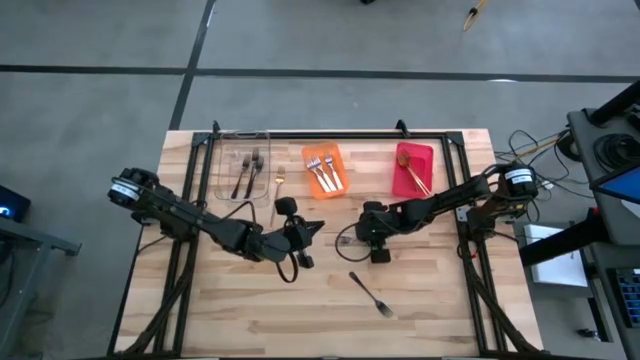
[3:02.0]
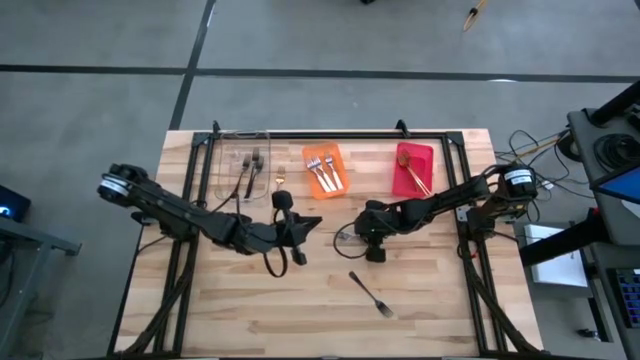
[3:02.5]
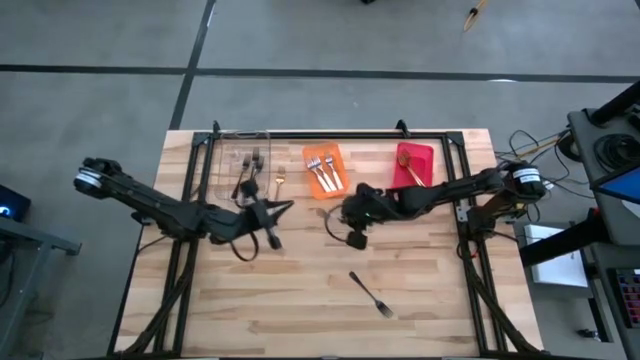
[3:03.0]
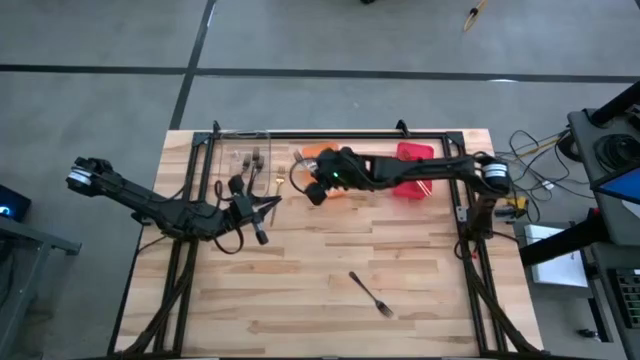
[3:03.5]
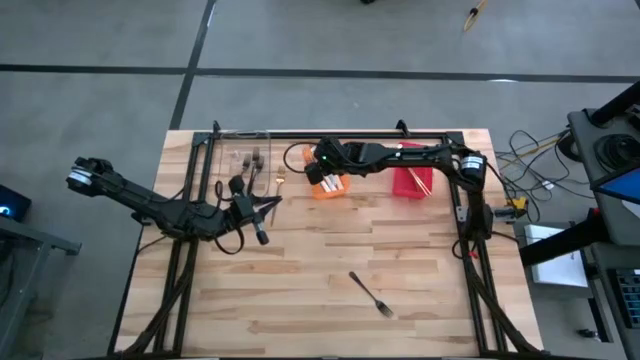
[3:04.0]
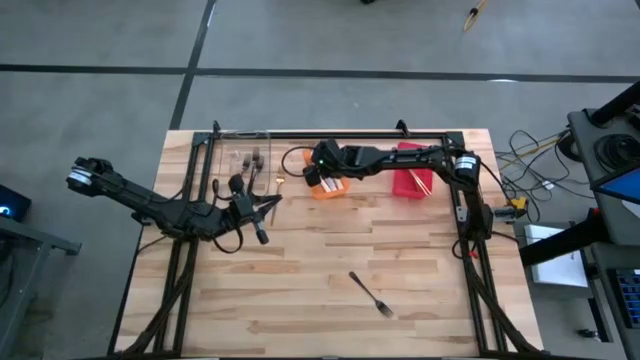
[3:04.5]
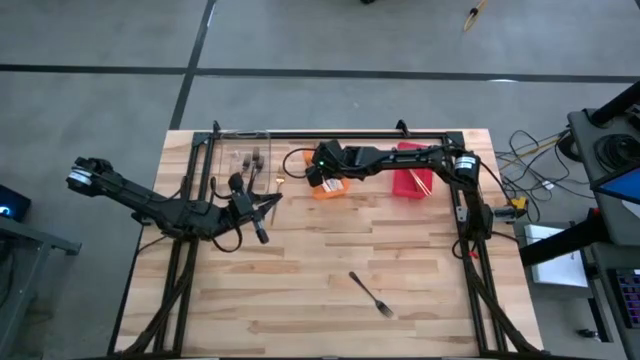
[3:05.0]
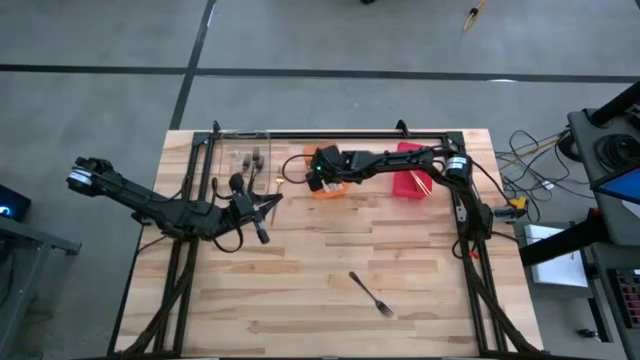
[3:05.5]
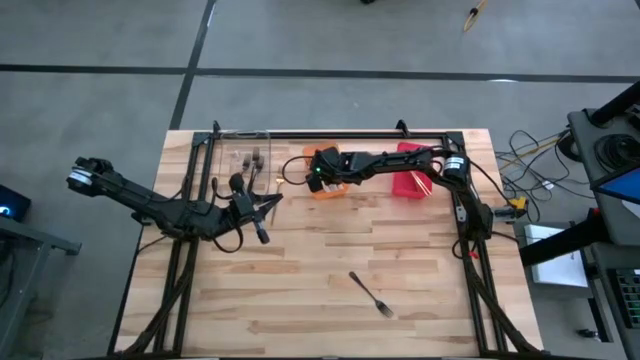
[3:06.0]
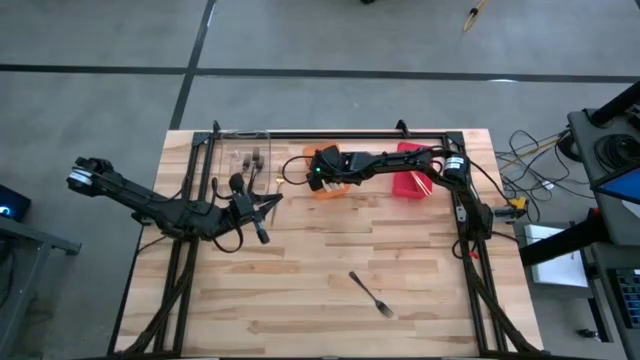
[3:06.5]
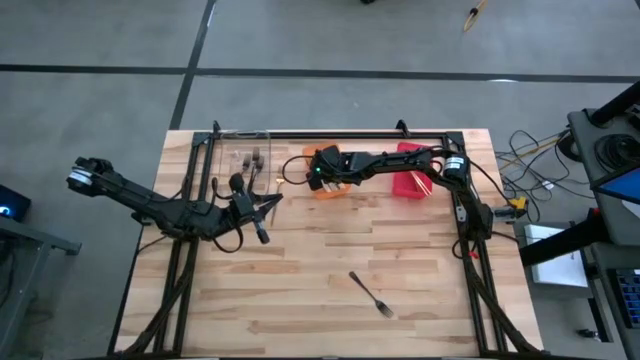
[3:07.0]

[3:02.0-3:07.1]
Task: Sort silverware by color (type)
Put the white fork into the orange bin

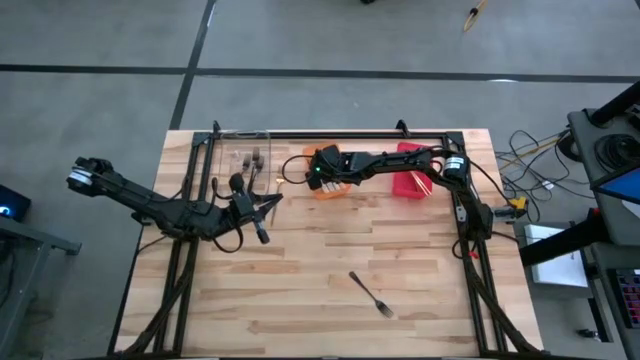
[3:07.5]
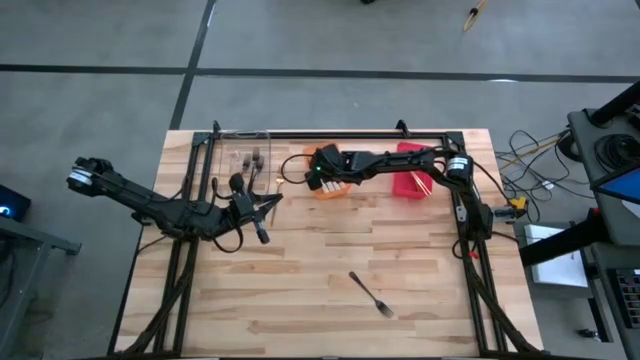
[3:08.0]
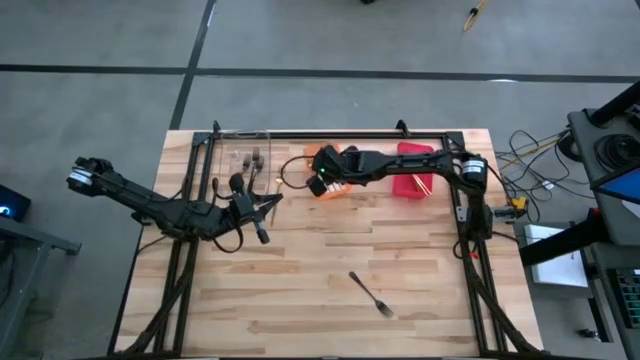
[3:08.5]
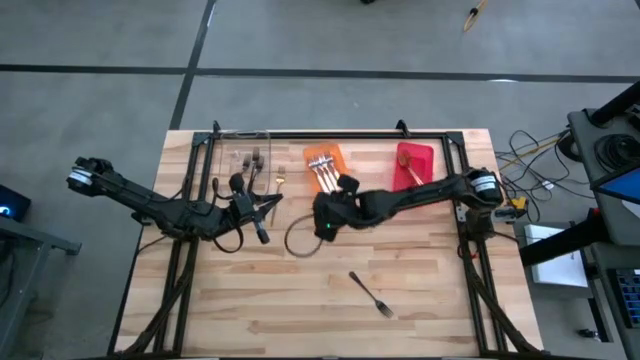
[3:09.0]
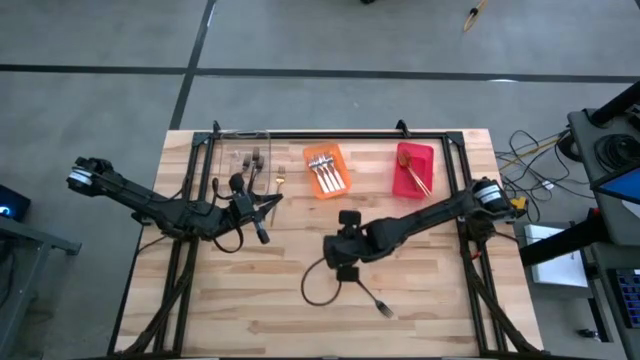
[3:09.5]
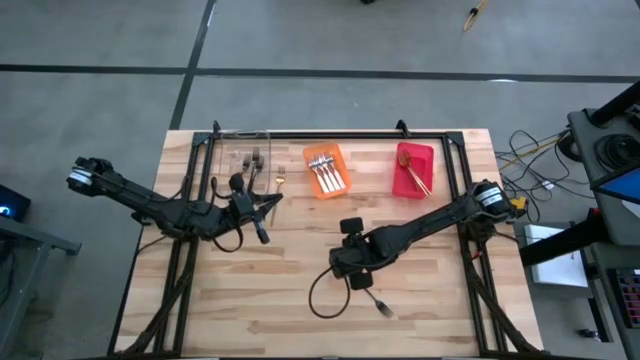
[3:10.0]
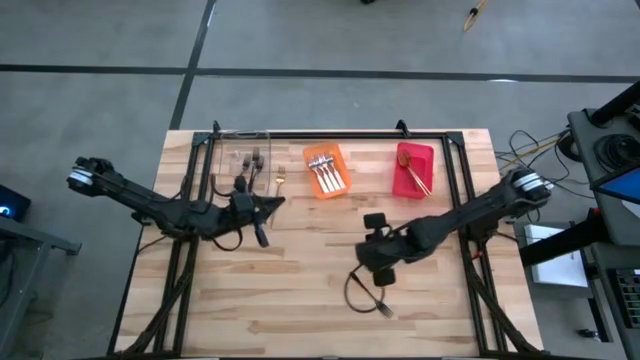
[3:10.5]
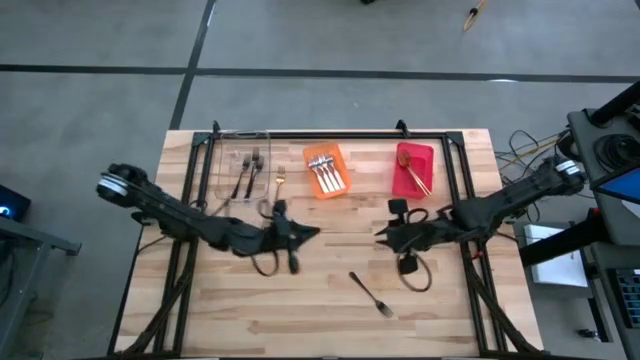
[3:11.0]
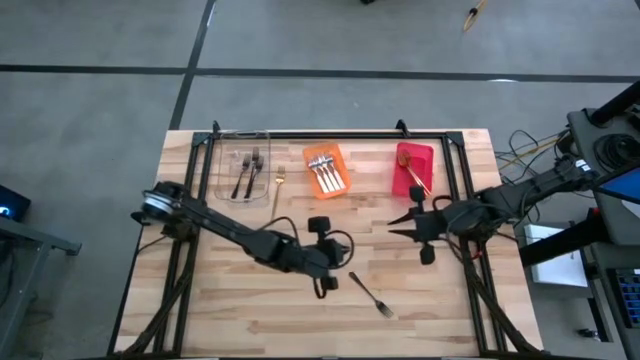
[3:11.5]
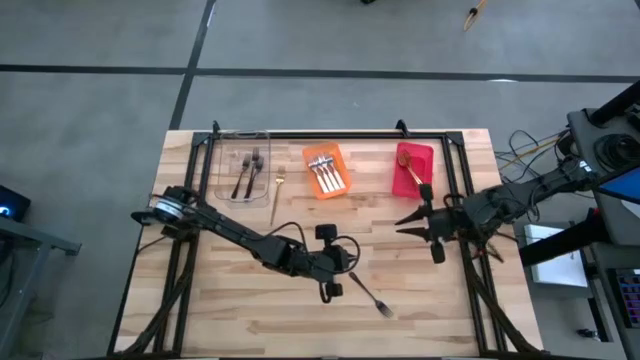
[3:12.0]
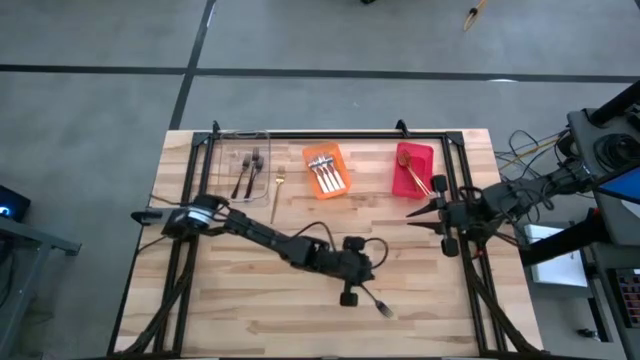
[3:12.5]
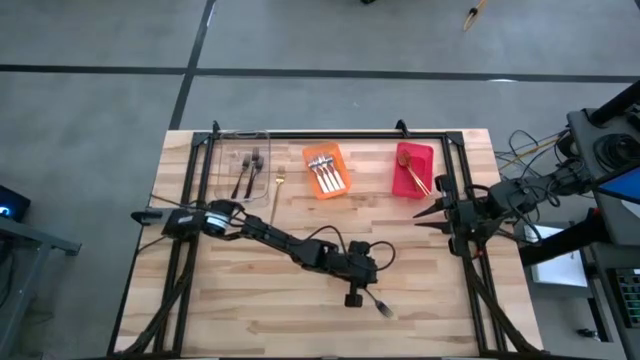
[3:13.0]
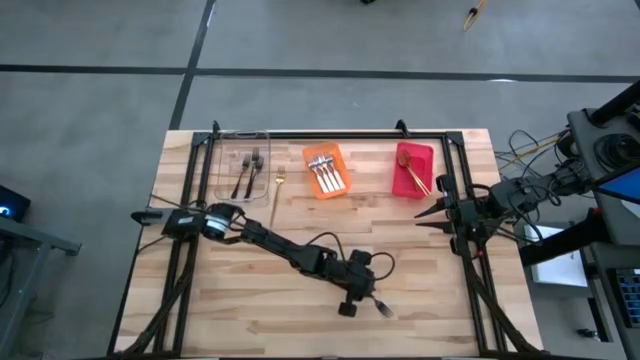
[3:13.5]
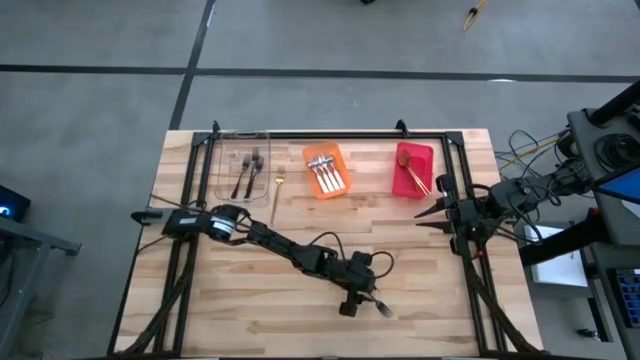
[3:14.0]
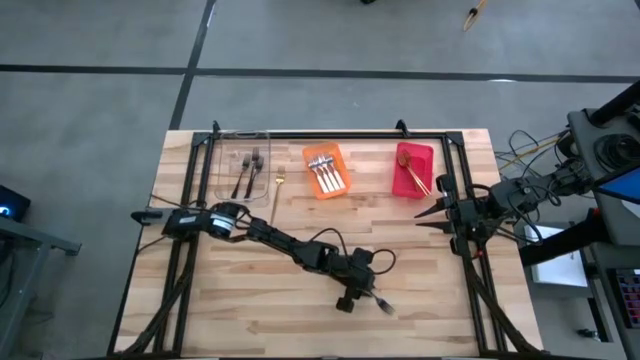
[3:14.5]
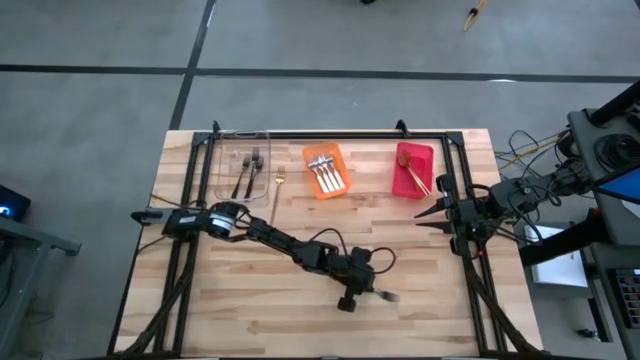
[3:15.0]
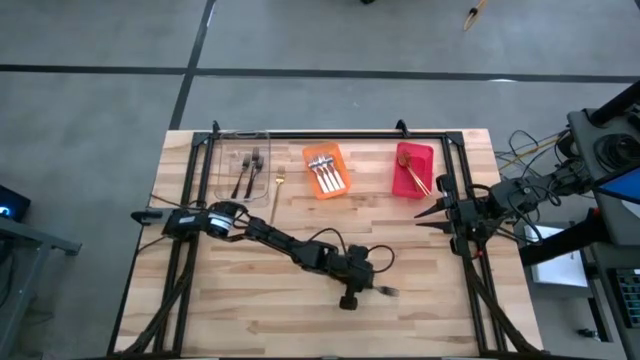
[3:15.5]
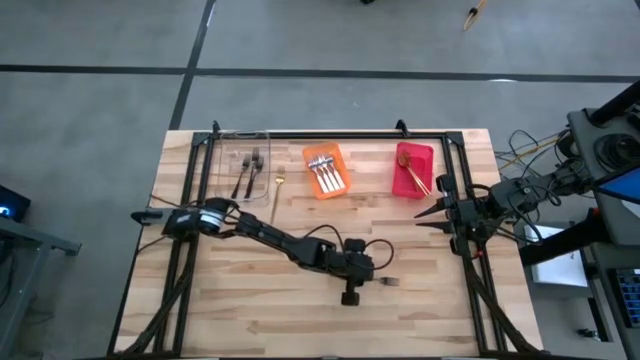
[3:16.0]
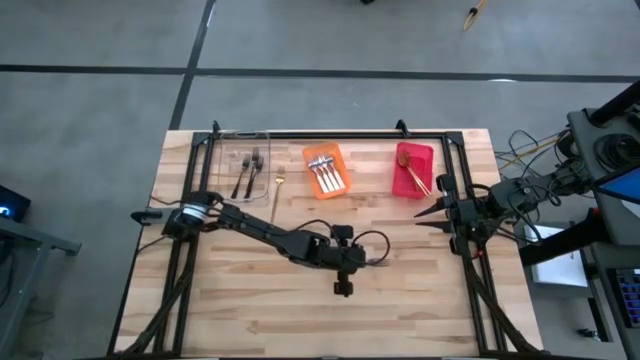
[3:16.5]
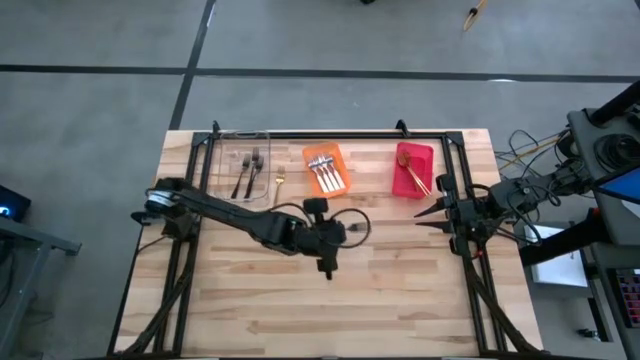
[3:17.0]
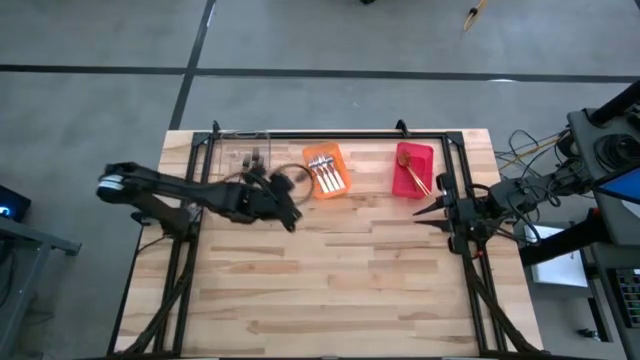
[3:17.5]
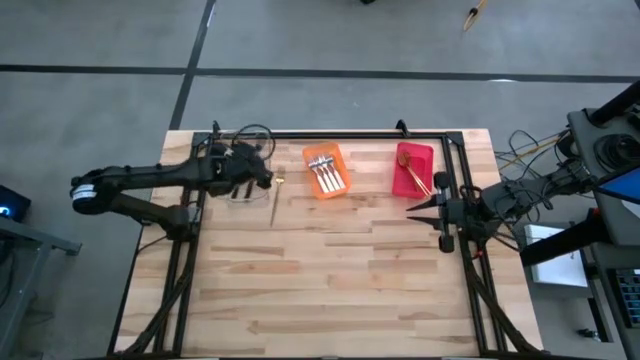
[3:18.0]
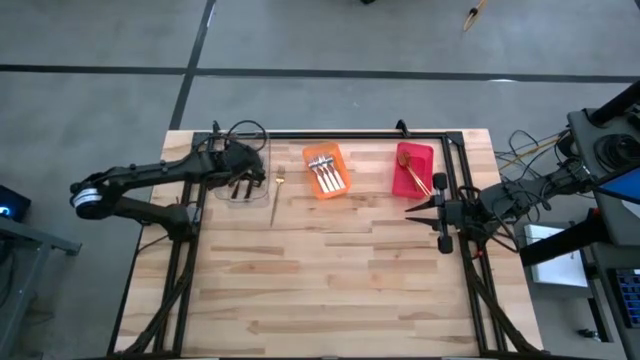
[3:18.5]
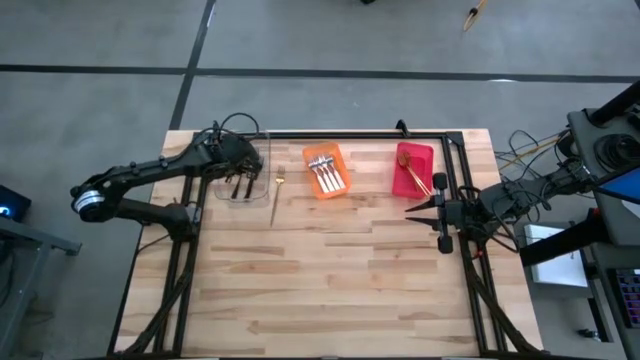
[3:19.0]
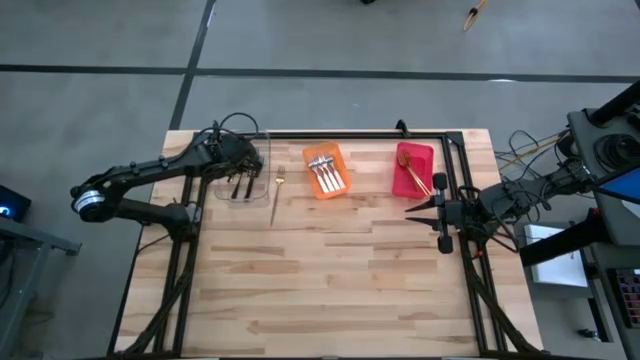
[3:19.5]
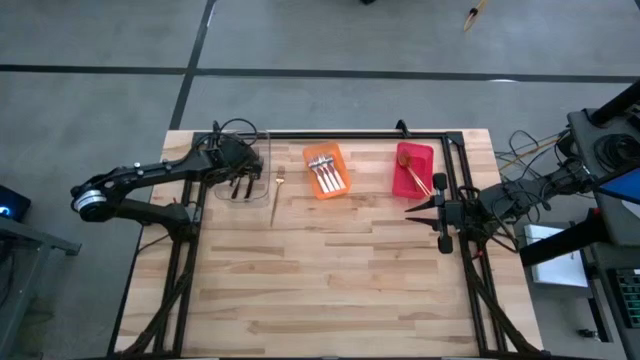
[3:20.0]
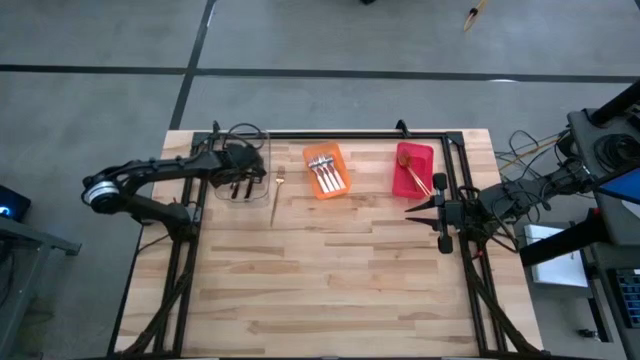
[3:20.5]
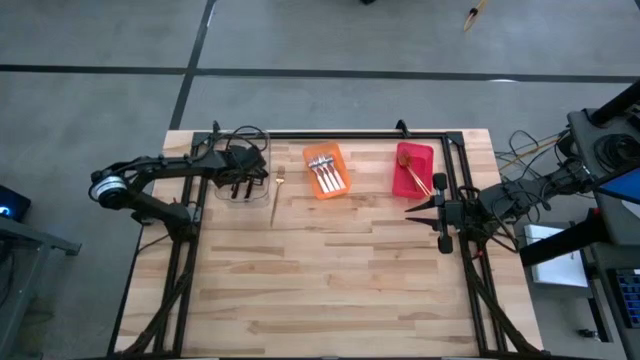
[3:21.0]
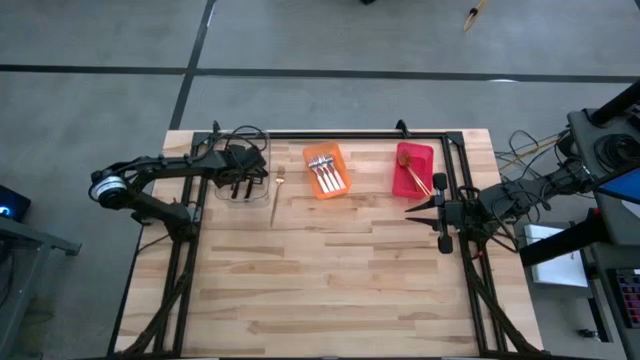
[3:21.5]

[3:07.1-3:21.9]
Put the black fork into the transparent bin
